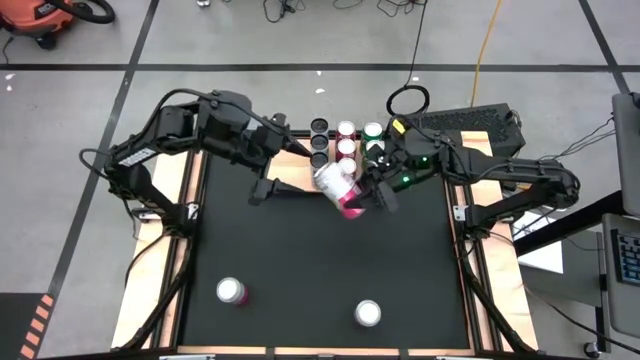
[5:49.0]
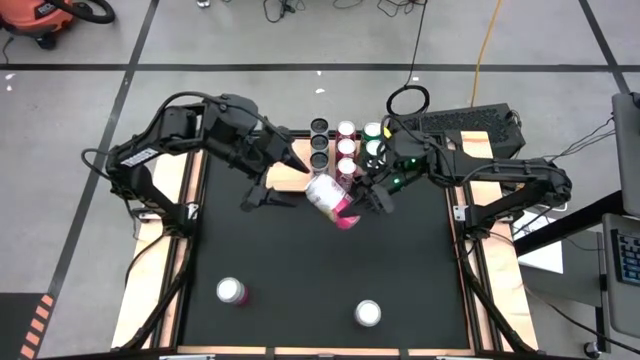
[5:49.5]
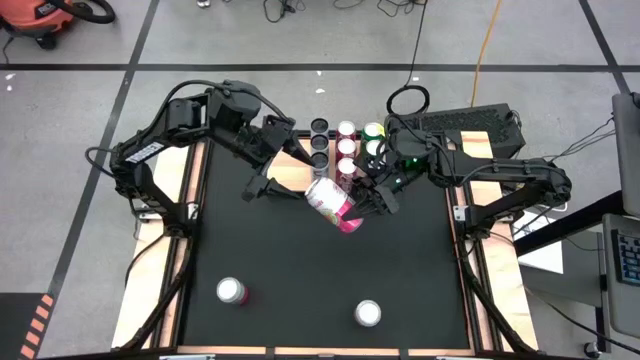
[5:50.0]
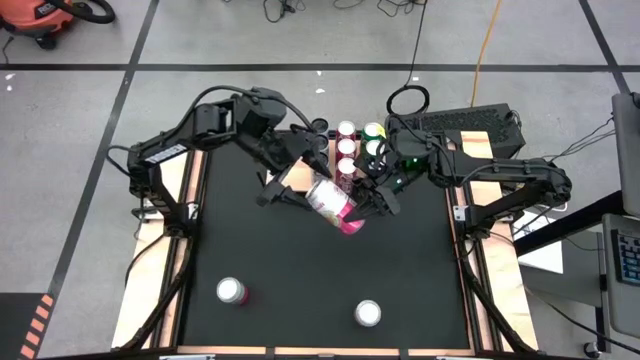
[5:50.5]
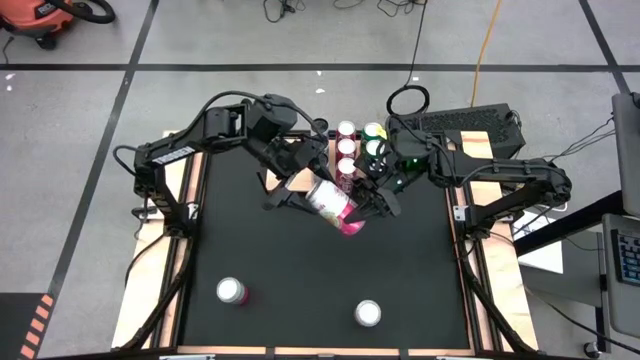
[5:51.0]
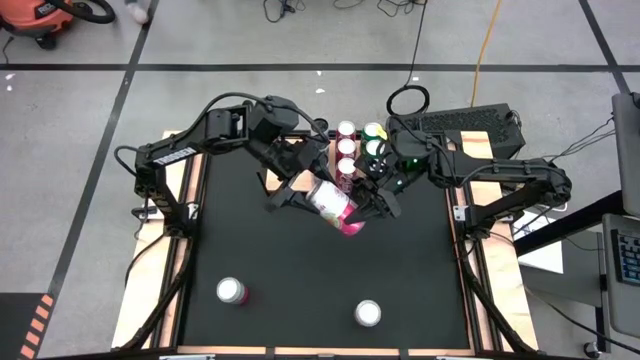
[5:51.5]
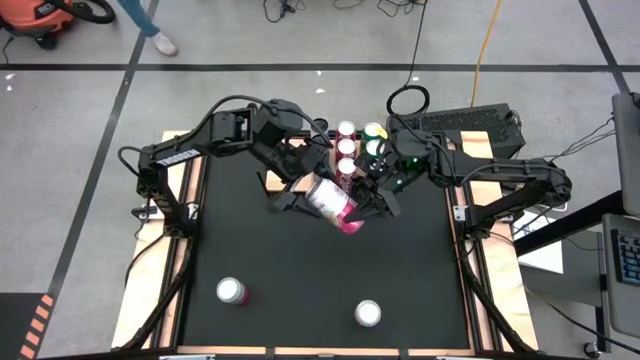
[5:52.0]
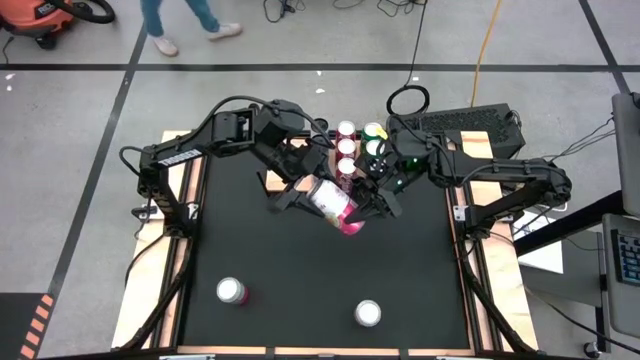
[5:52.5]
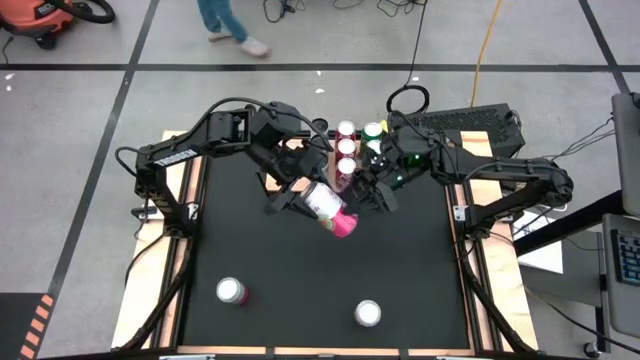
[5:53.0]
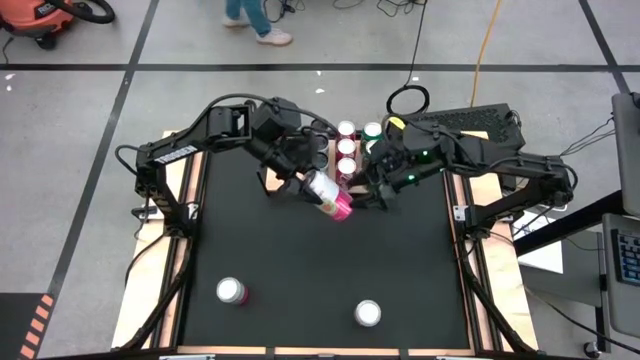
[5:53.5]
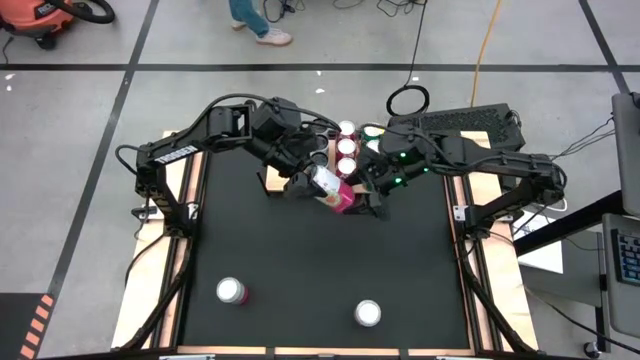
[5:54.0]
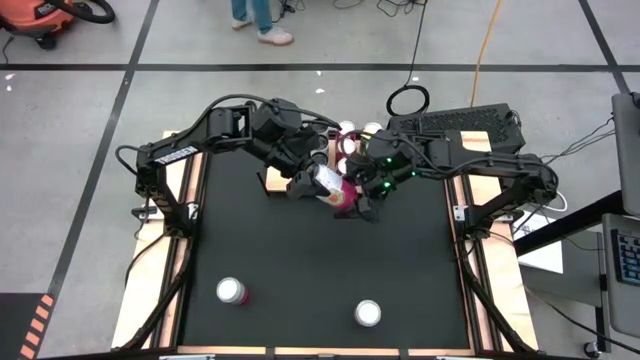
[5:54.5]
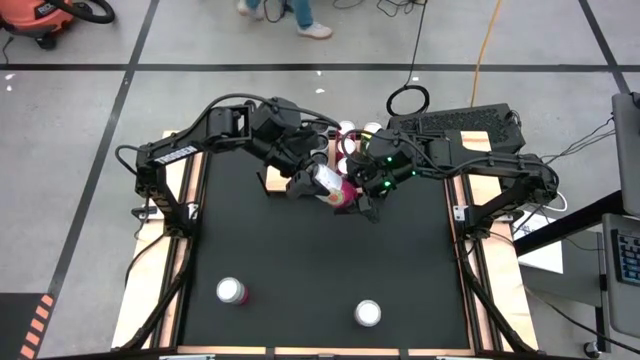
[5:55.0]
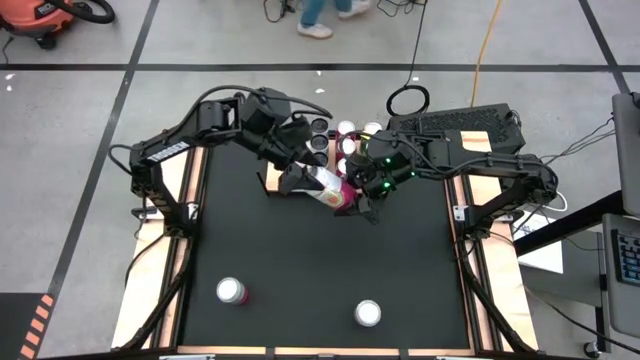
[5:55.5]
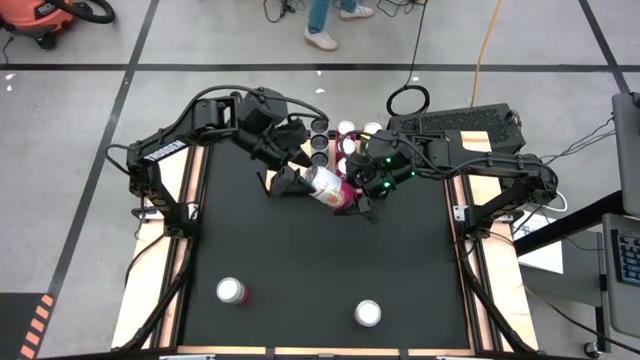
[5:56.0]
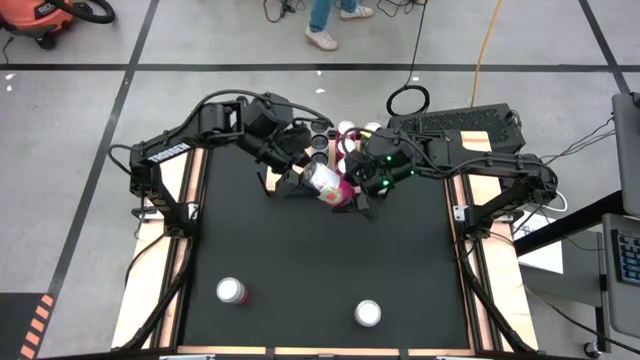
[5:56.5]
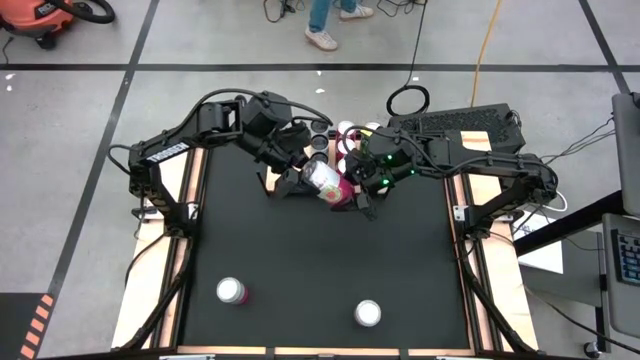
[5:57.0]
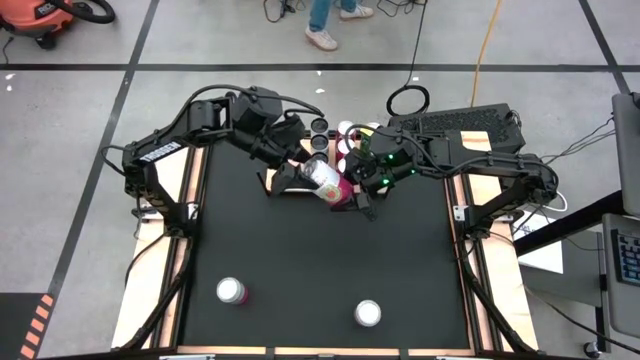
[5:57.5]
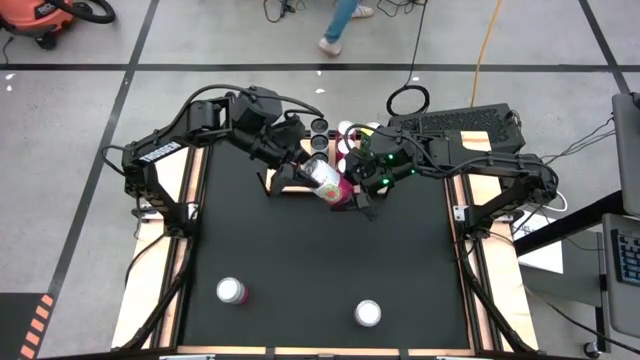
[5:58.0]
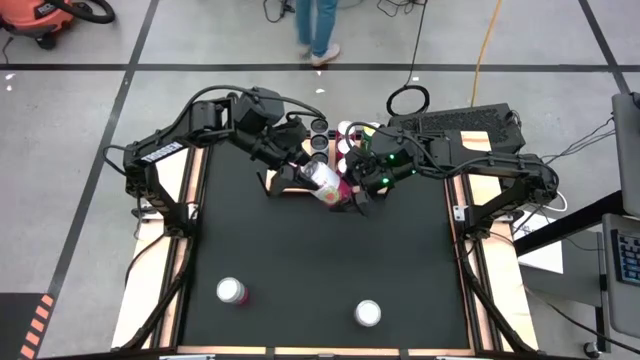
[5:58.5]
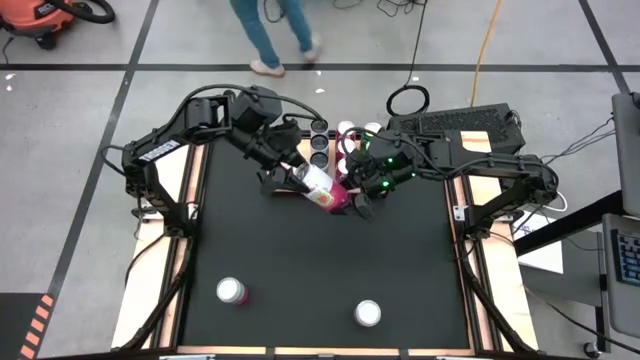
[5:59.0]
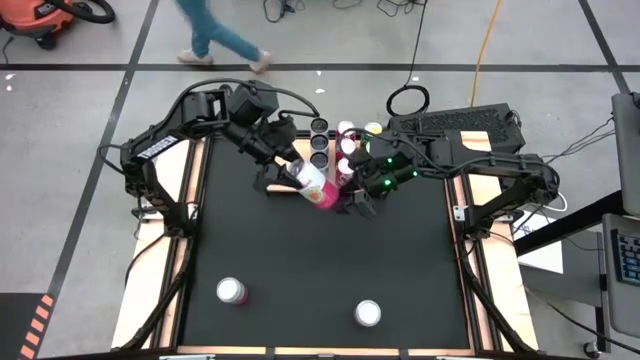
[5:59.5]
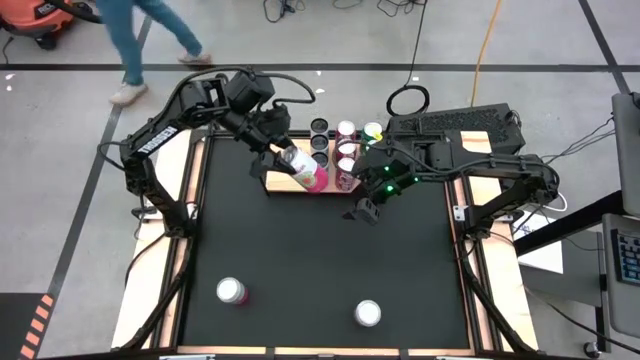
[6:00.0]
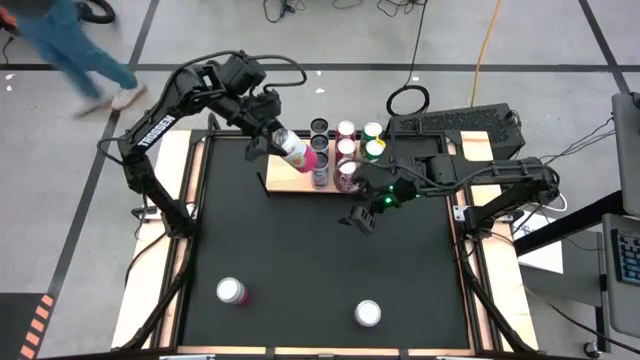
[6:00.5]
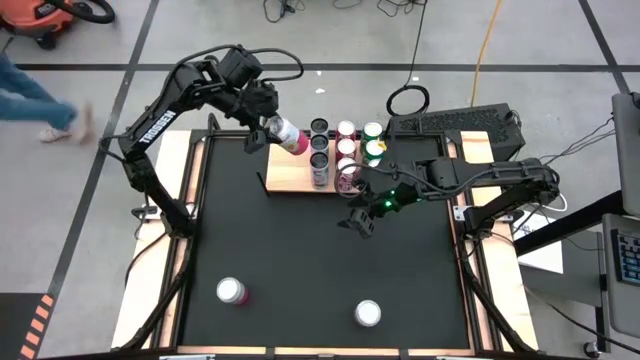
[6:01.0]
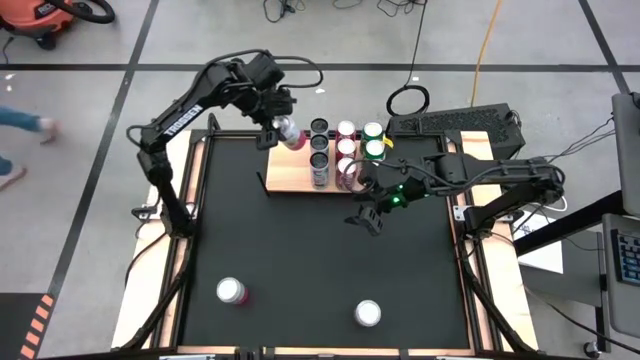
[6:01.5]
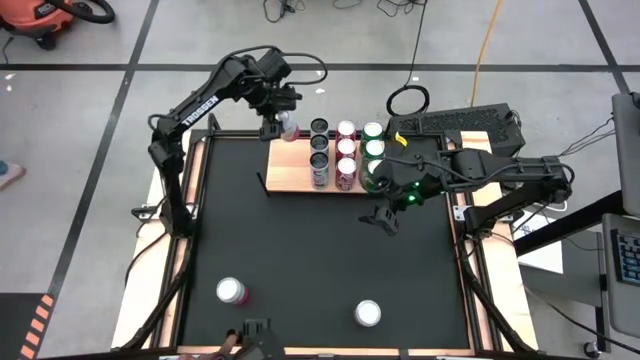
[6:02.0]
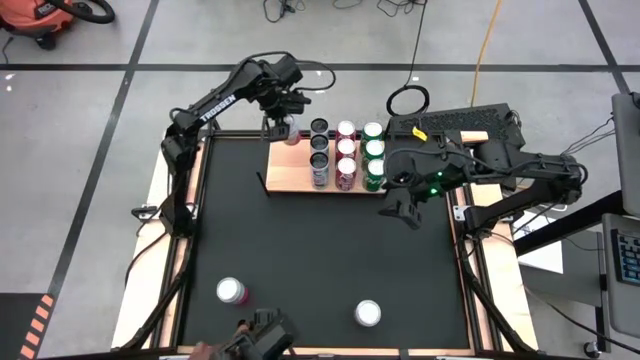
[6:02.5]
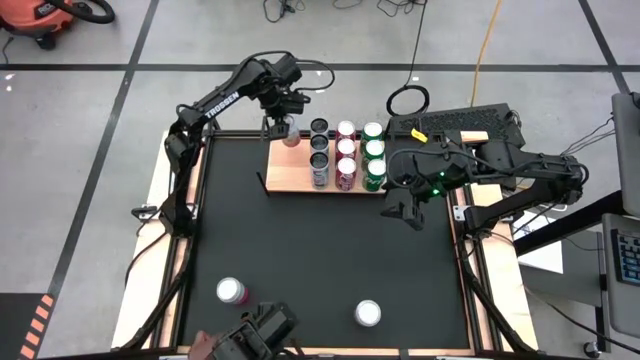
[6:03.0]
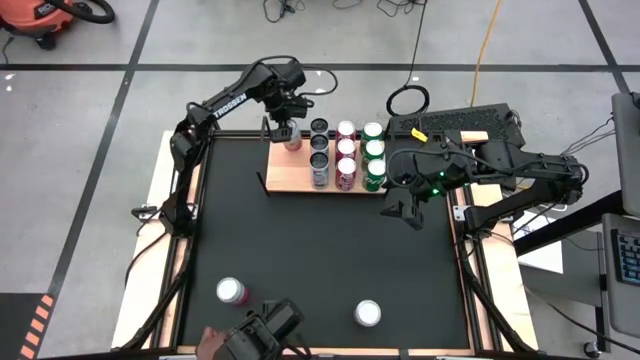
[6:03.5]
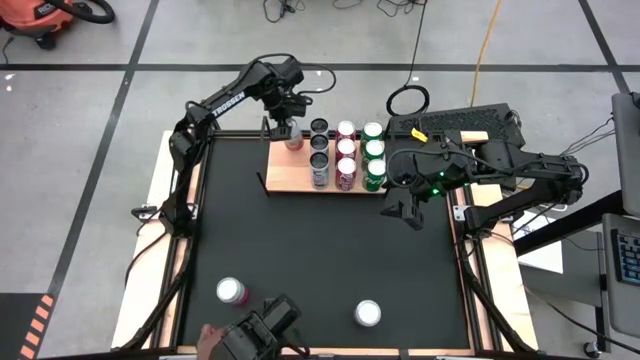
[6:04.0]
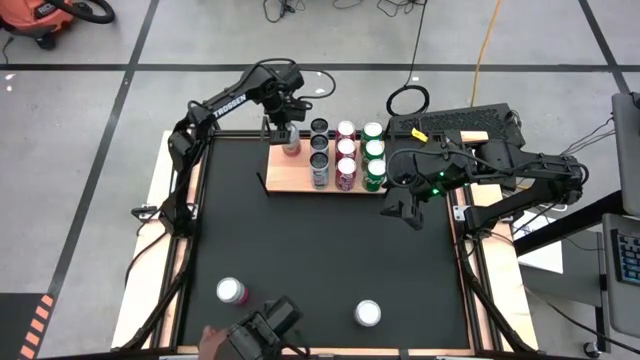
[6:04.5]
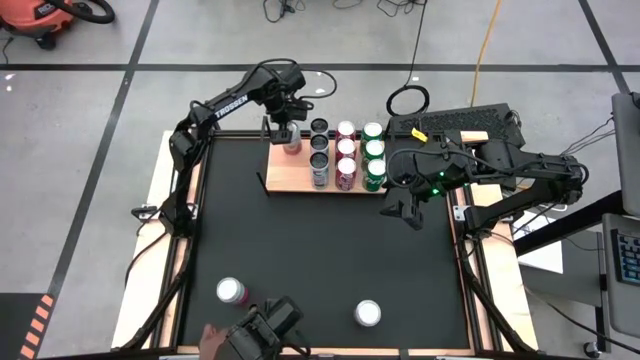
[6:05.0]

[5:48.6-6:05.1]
Task: Place canned beverage on shelf
Put the middle pink soda can on the shelf

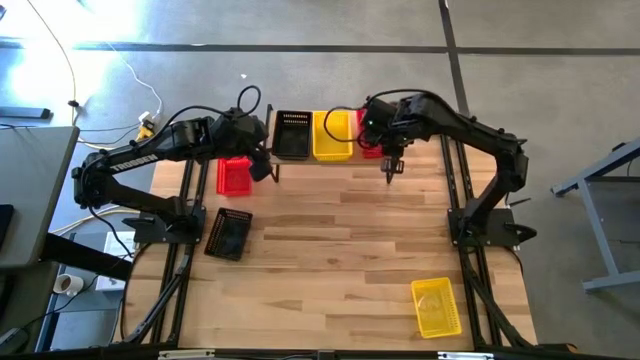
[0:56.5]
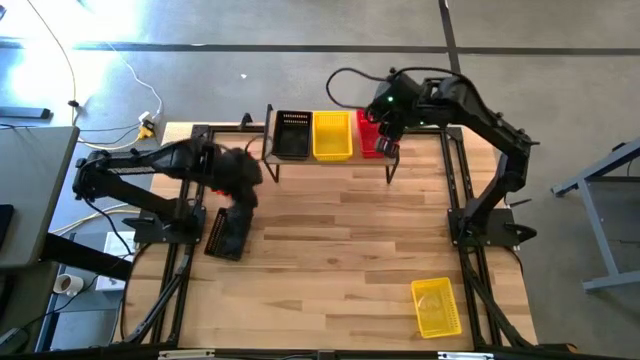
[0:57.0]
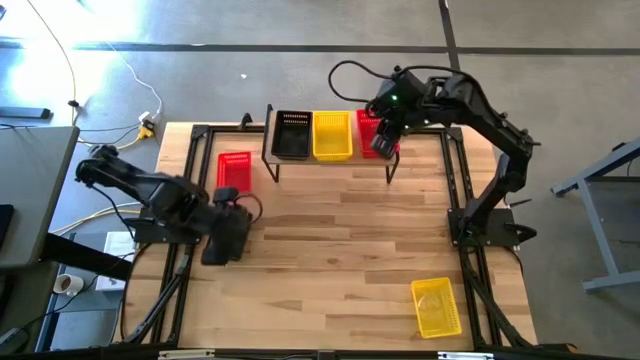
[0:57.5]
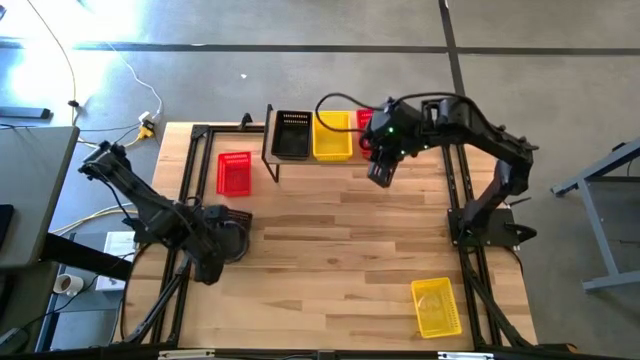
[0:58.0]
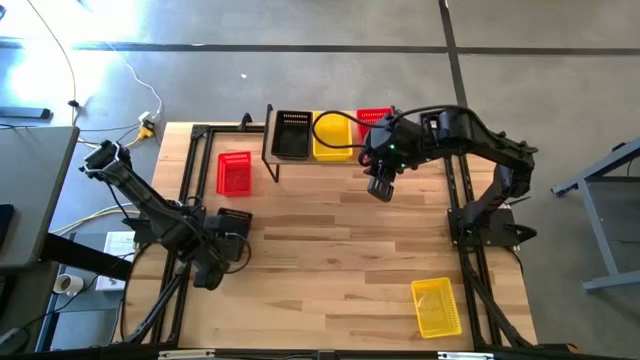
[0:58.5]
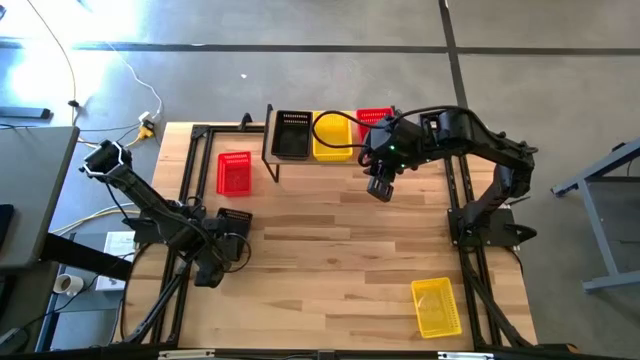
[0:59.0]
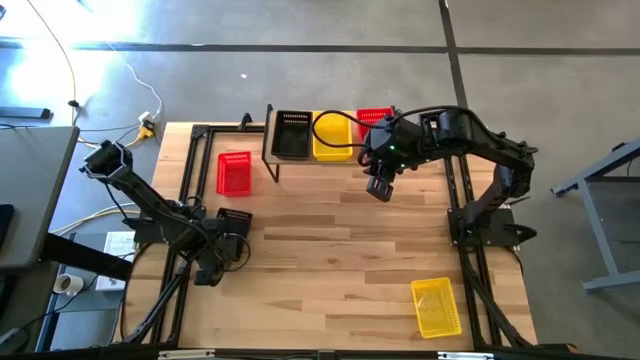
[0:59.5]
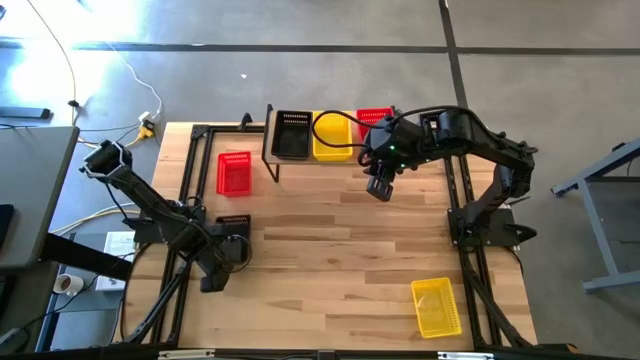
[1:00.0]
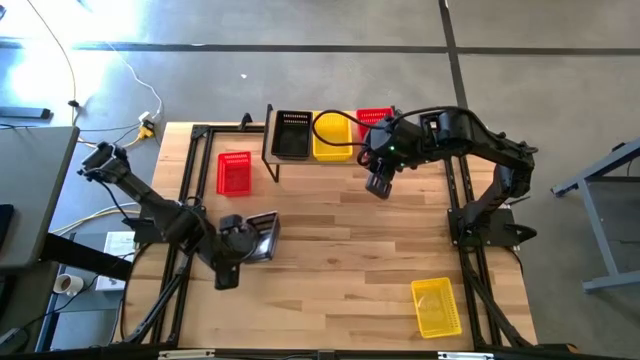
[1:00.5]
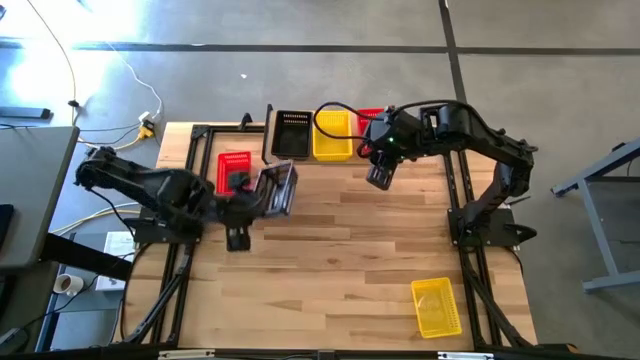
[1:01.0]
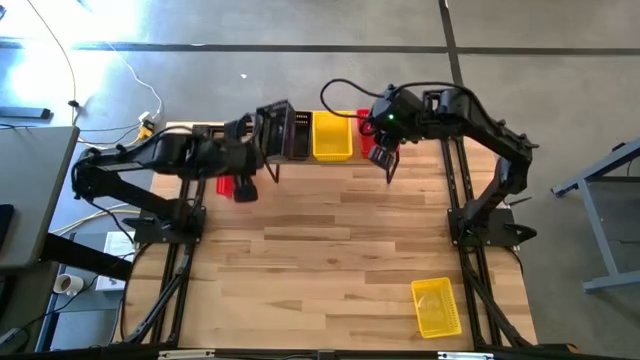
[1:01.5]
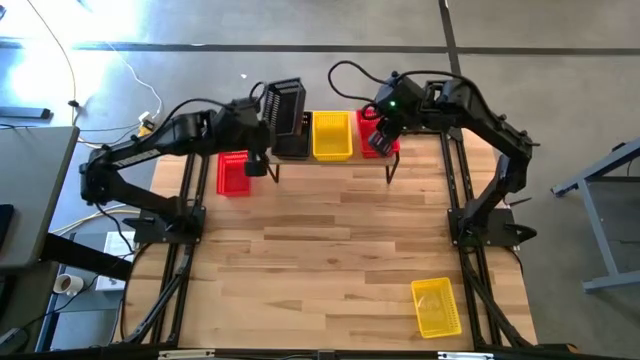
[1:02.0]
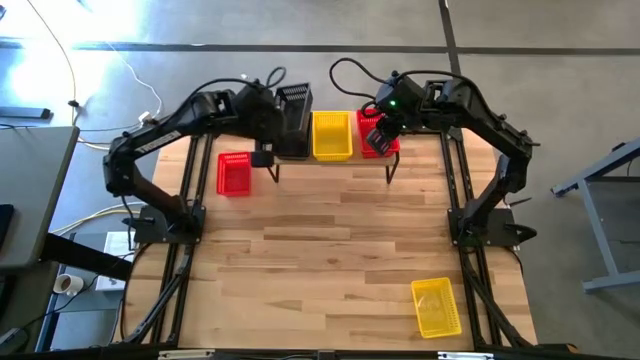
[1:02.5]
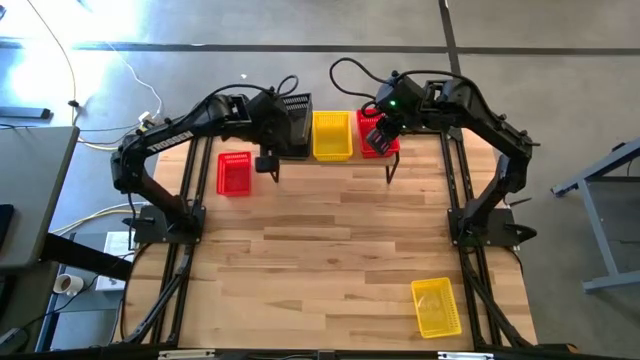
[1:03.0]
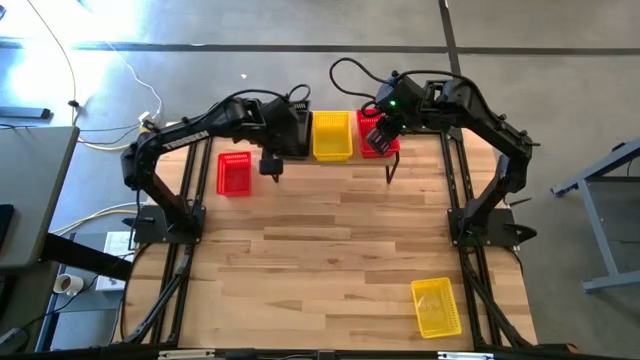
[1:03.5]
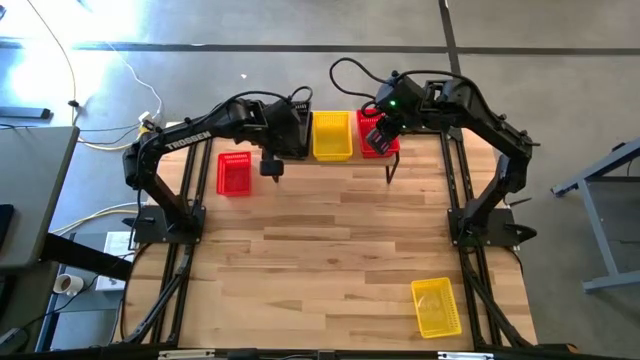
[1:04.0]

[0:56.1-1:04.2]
Task: Stack baskets on shelf by color
Stack the black bin on top of the black bin on the shelf
